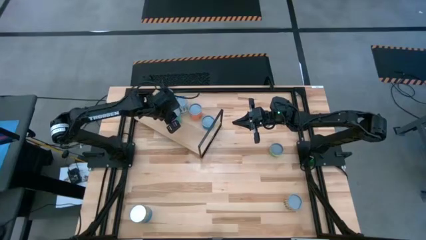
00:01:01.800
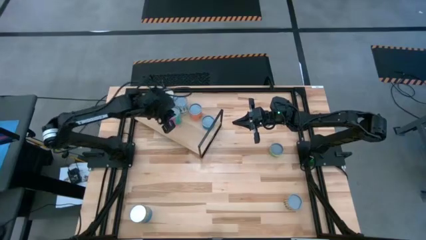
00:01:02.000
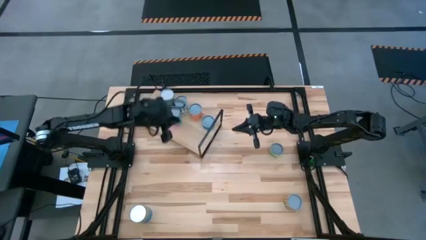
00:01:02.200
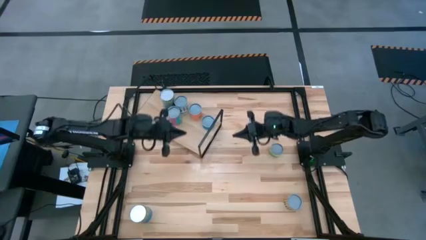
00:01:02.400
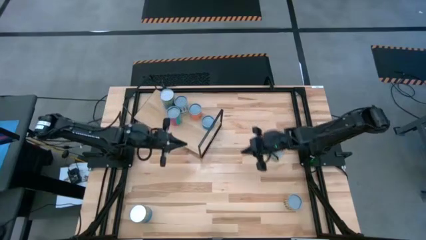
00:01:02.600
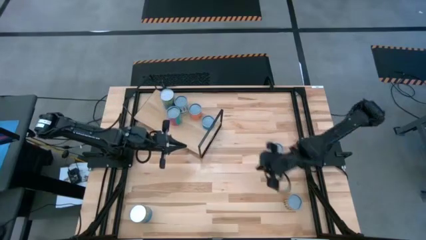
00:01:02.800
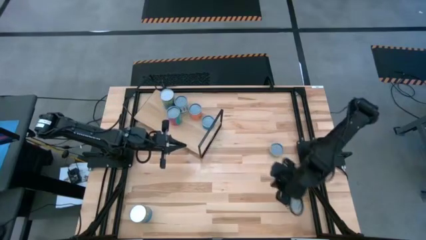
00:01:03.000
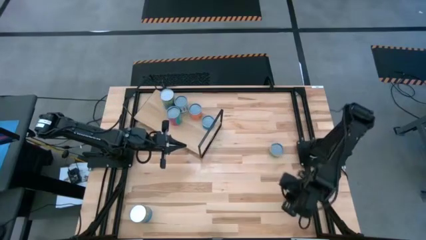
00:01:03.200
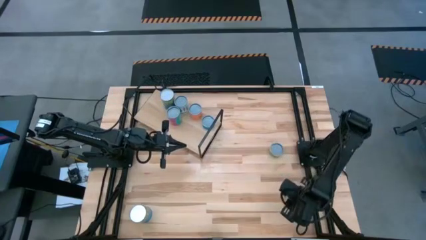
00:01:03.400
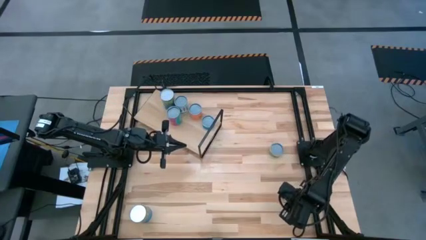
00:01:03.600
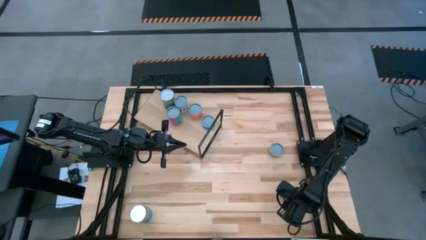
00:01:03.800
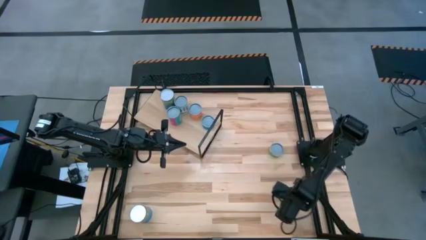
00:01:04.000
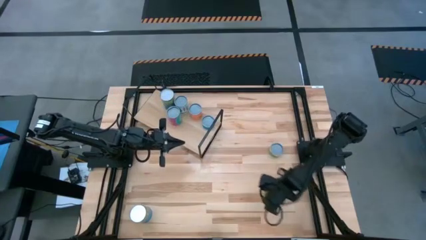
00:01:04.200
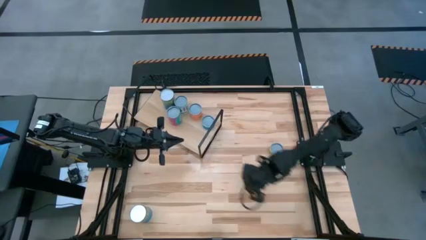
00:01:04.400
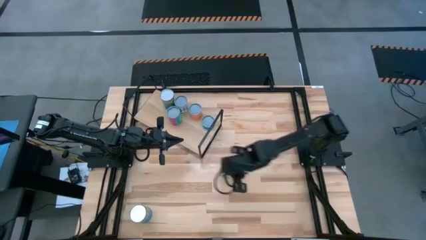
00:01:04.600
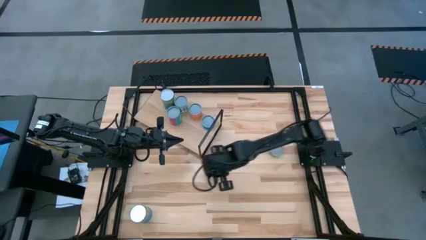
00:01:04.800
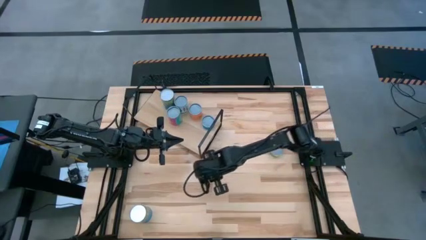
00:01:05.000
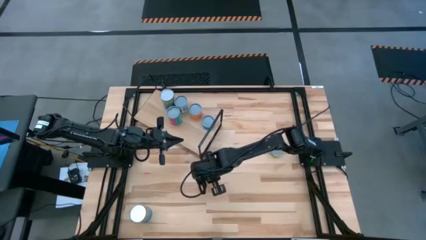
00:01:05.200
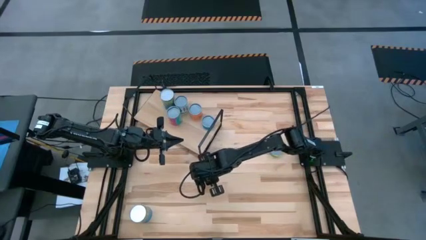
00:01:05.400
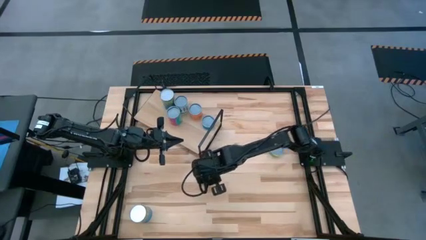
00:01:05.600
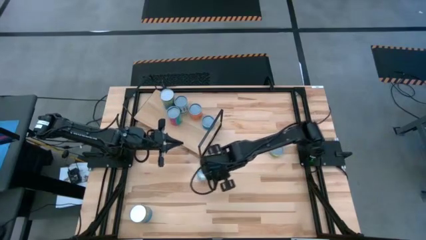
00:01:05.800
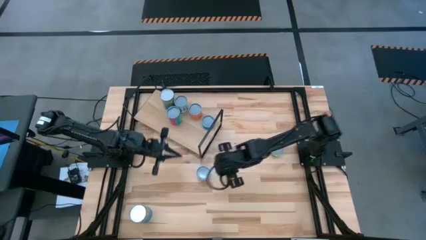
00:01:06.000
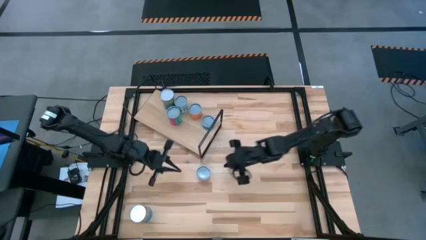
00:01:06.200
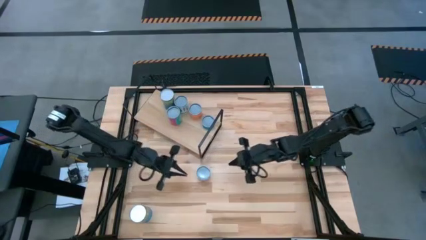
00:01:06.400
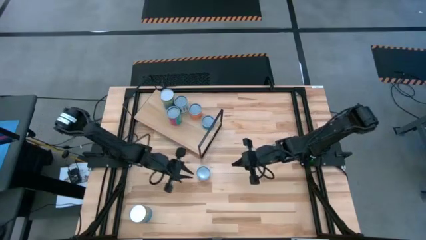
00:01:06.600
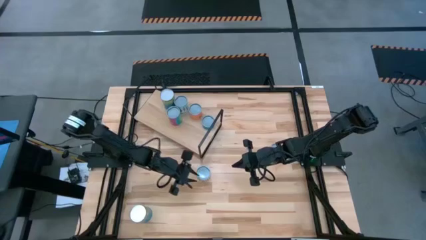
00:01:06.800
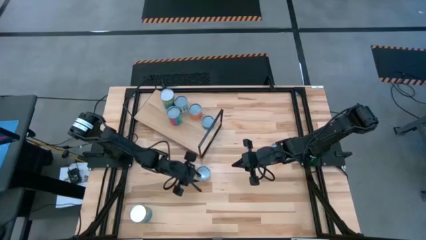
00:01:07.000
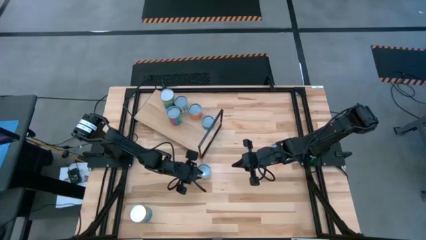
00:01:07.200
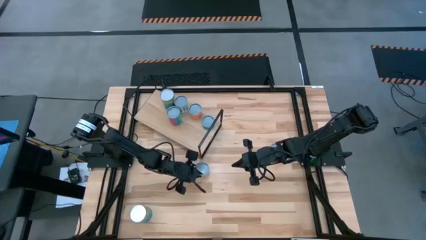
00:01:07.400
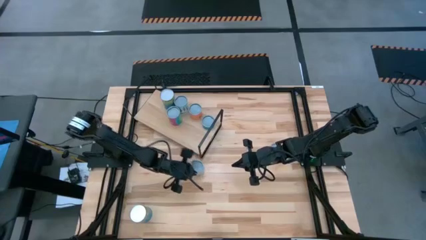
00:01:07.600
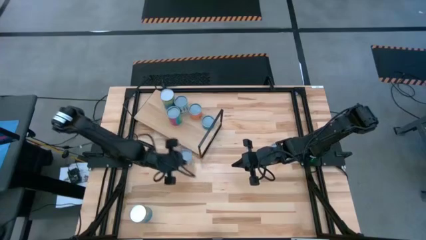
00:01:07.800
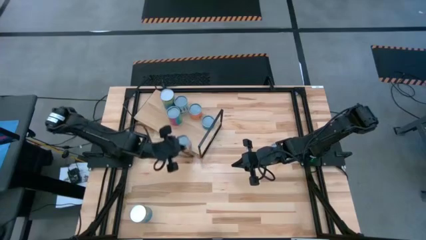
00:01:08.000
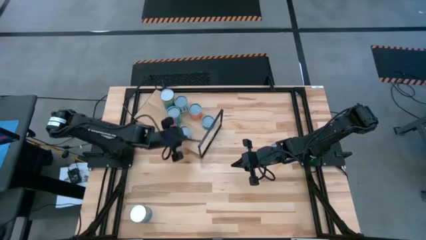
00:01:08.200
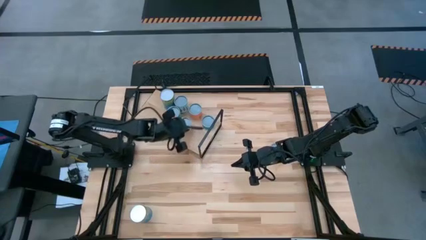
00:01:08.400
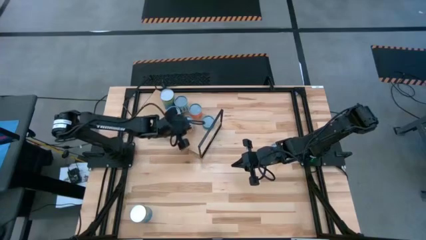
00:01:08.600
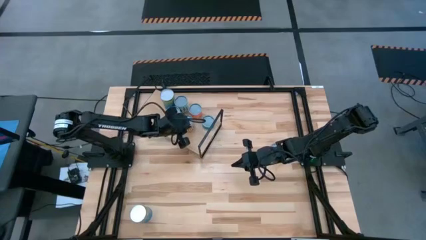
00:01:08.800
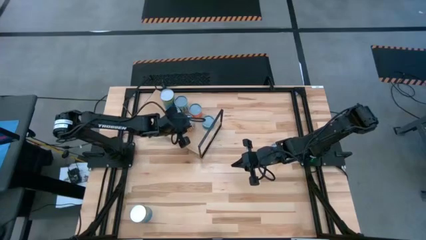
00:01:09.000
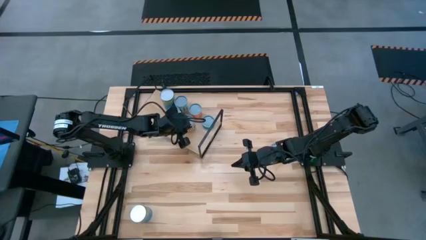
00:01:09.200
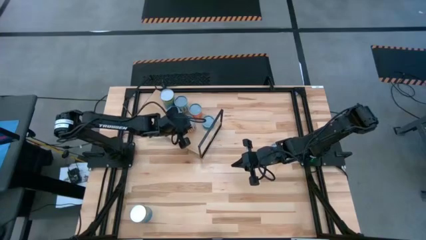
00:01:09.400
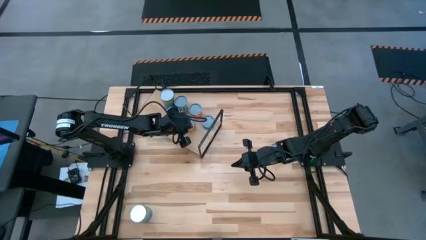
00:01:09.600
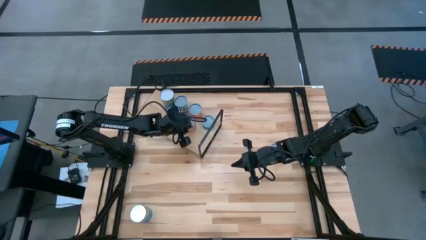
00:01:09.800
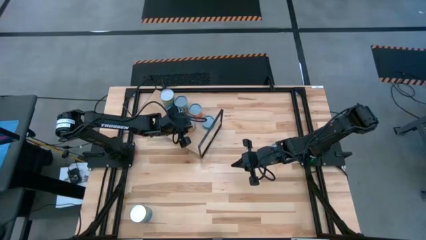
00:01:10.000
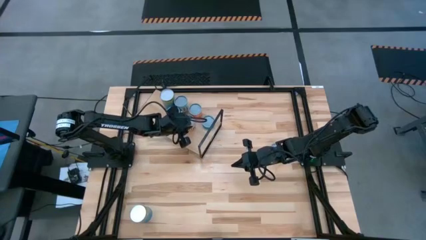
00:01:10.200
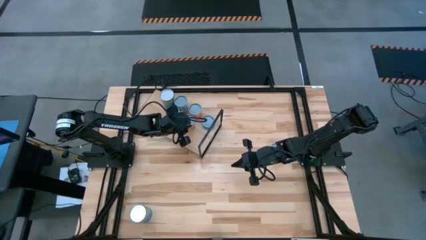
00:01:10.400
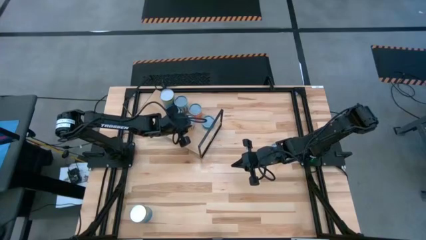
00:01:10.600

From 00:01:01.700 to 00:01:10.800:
Task: Pick and place cans onto a shelf
Put the canned black beans on the shelf

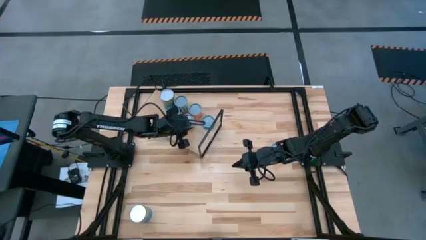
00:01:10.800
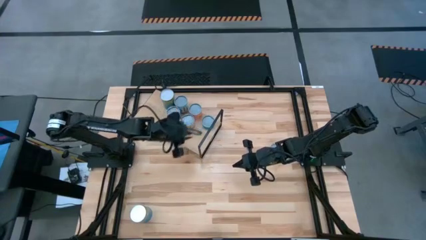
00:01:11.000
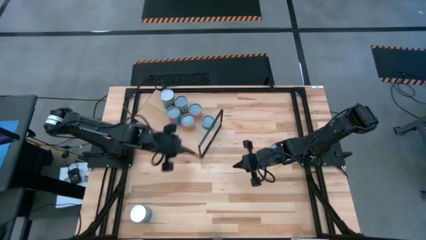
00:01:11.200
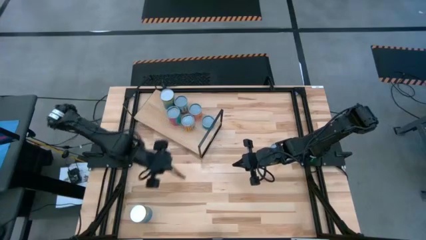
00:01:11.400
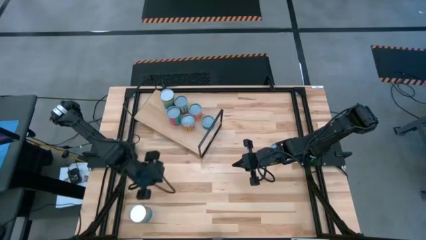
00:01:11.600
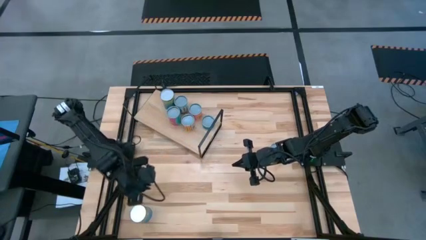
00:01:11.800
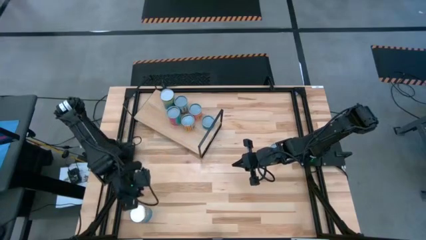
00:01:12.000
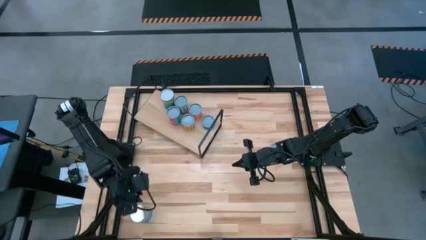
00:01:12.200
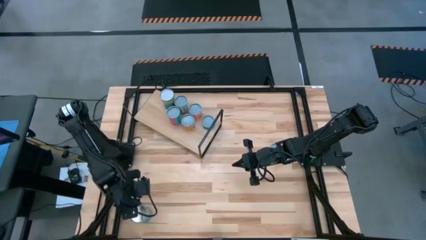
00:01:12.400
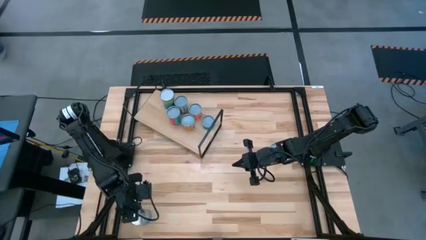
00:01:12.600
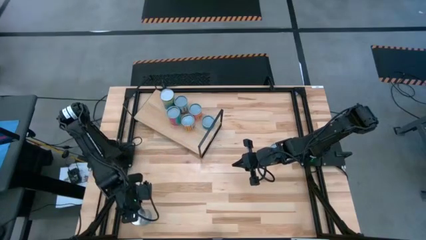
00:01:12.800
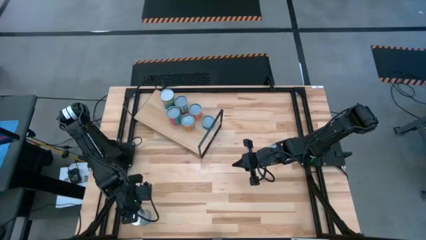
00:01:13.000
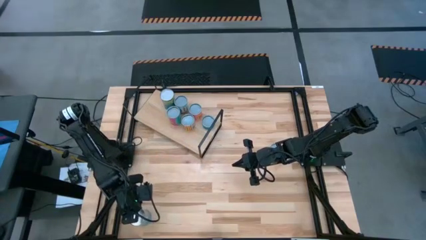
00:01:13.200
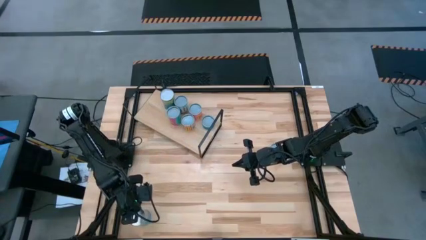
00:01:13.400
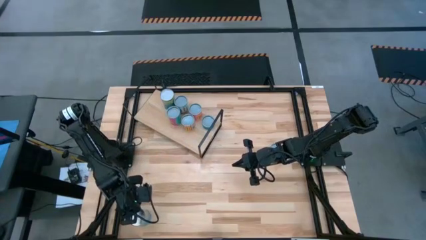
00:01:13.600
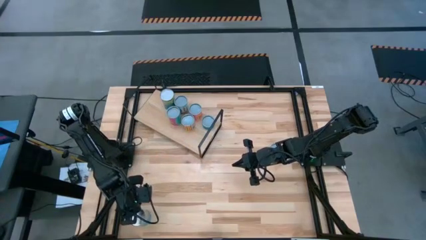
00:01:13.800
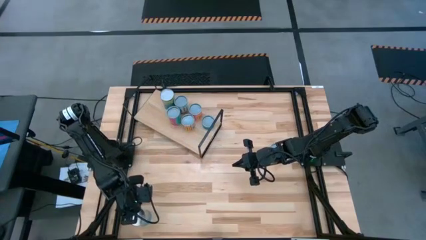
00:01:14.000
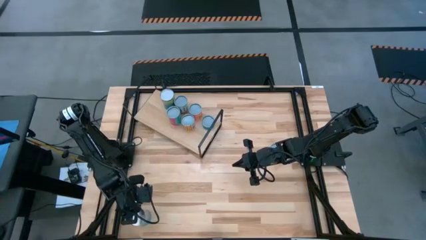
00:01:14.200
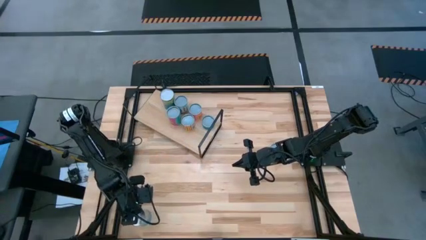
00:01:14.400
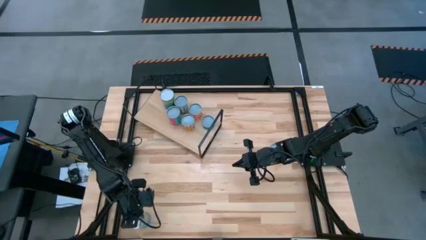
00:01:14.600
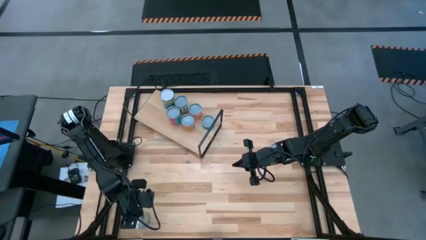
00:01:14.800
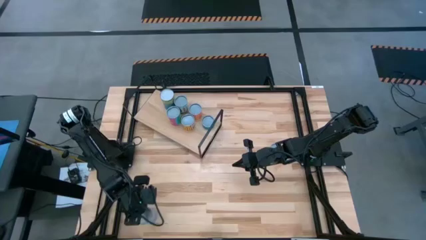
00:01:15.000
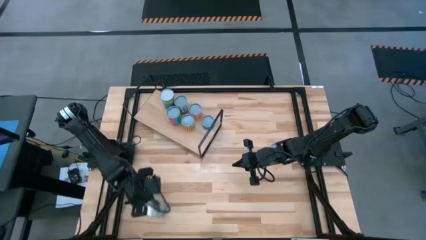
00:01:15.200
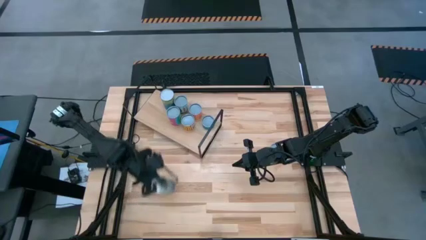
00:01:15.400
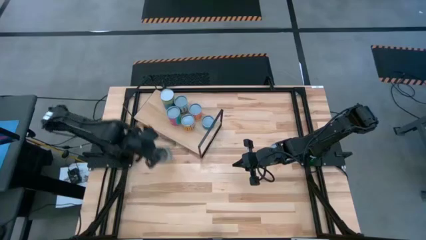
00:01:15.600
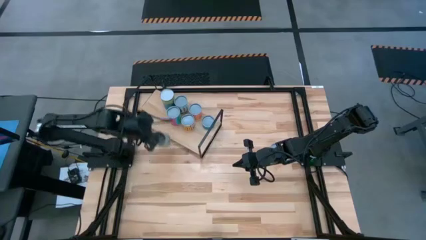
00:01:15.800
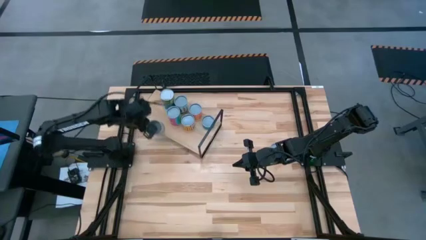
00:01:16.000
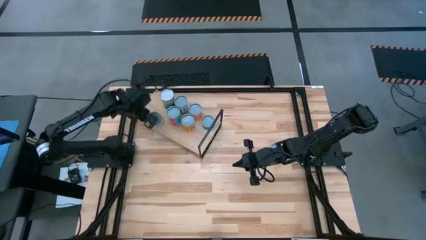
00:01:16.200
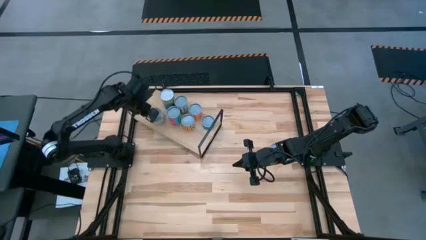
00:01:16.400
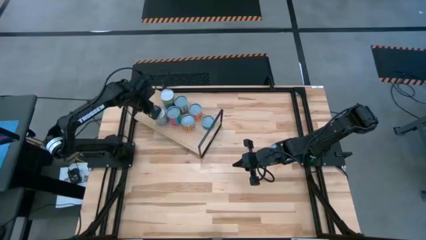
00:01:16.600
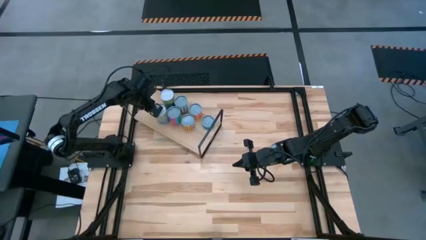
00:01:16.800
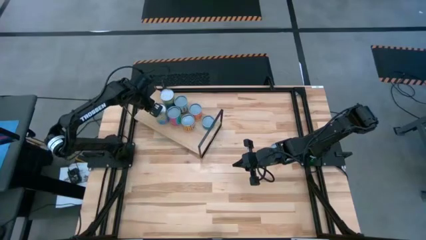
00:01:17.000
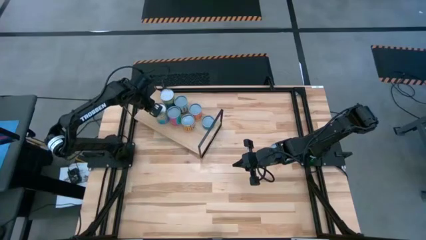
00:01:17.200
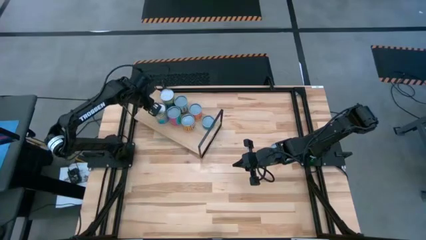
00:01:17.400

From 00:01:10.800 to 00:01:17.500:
Put the canned cherries on the shelf and align them with other canned cherries
